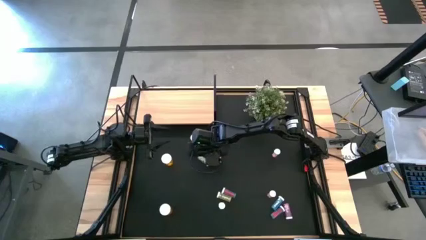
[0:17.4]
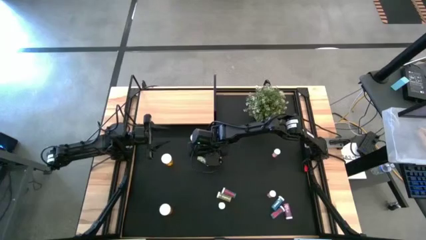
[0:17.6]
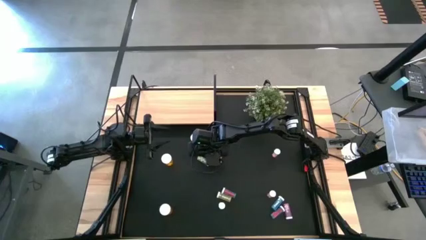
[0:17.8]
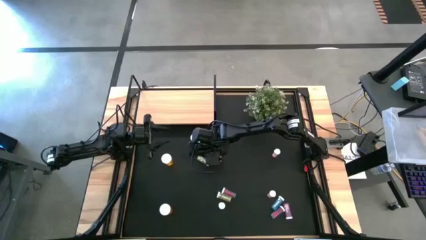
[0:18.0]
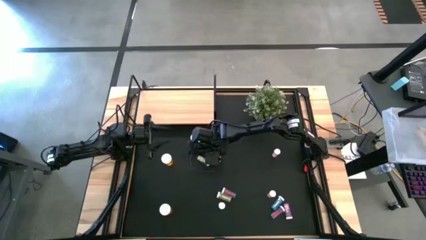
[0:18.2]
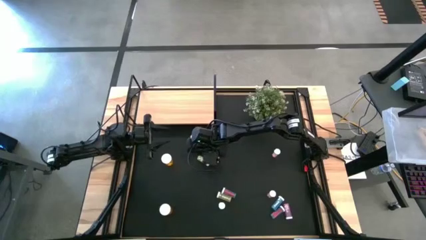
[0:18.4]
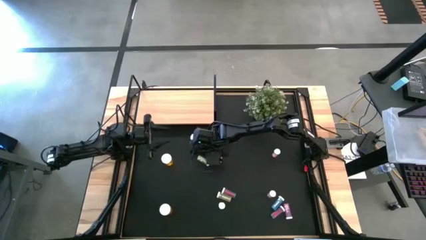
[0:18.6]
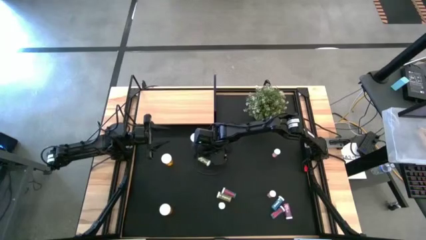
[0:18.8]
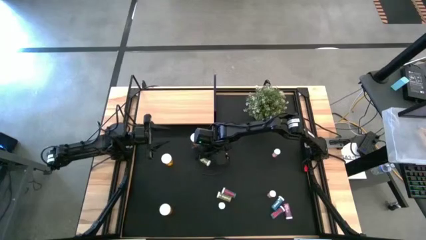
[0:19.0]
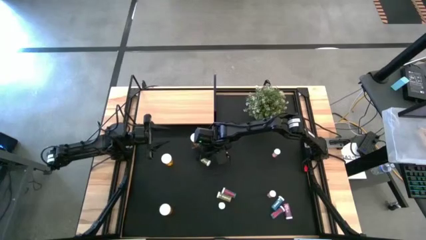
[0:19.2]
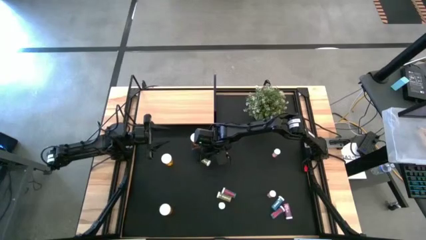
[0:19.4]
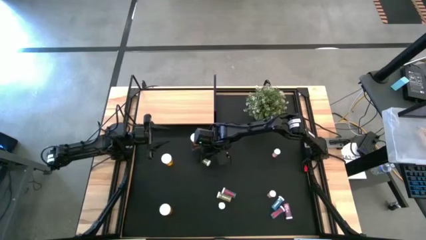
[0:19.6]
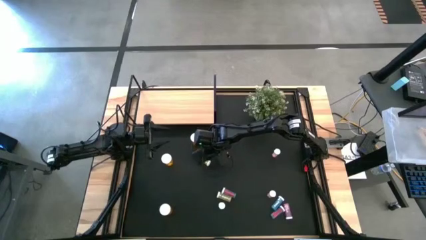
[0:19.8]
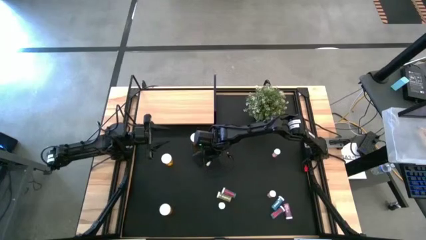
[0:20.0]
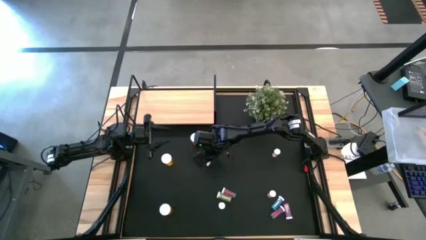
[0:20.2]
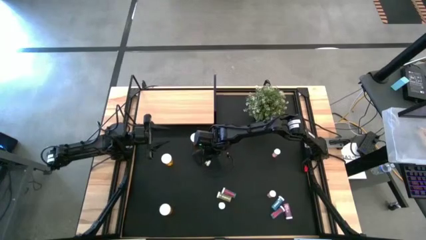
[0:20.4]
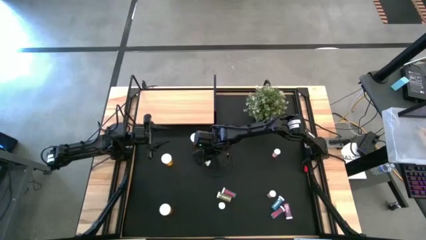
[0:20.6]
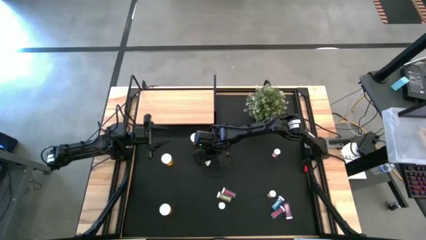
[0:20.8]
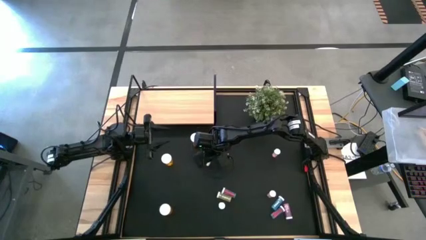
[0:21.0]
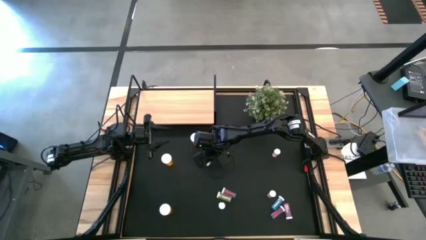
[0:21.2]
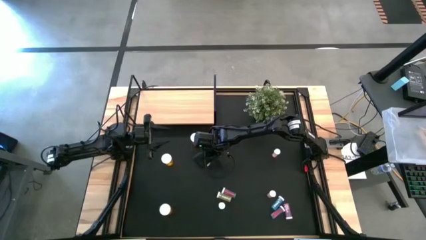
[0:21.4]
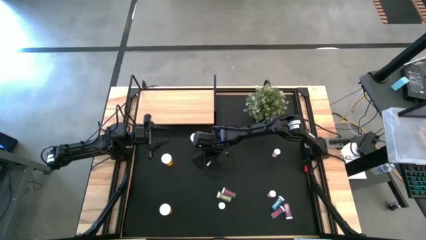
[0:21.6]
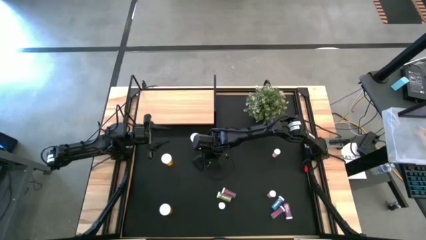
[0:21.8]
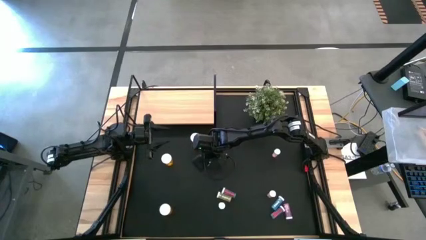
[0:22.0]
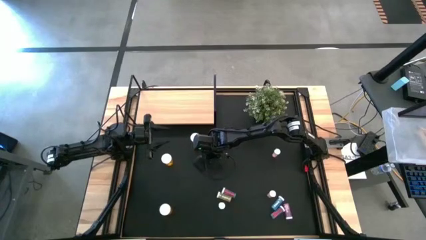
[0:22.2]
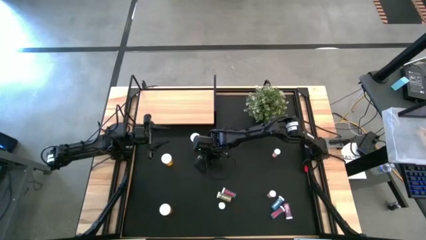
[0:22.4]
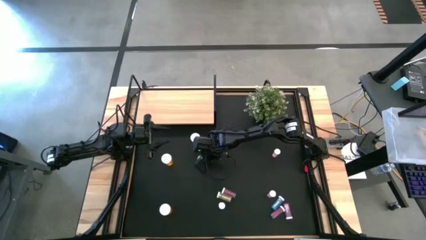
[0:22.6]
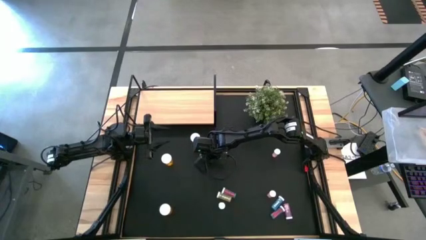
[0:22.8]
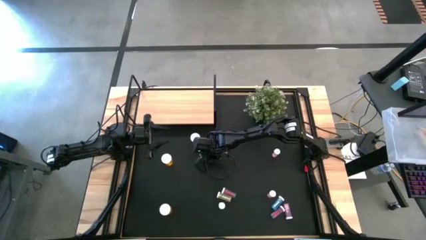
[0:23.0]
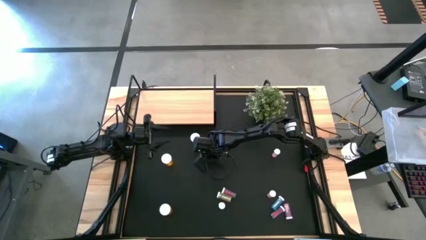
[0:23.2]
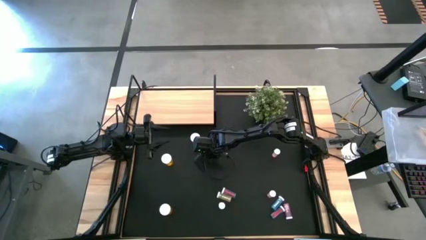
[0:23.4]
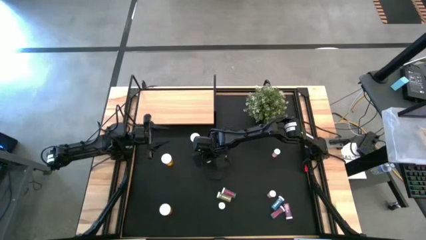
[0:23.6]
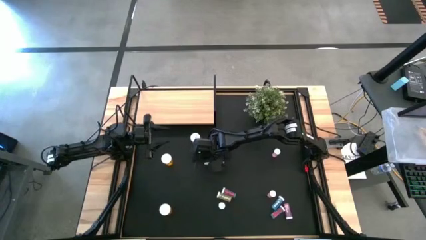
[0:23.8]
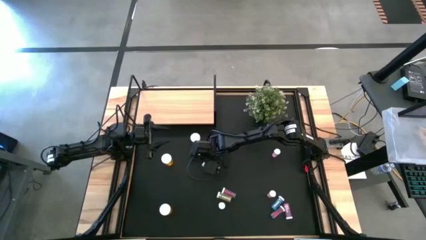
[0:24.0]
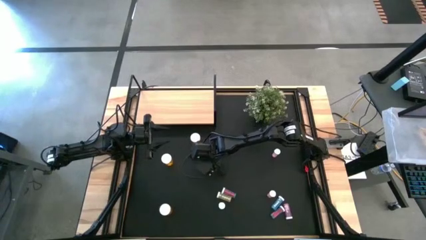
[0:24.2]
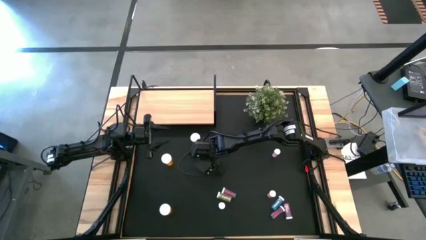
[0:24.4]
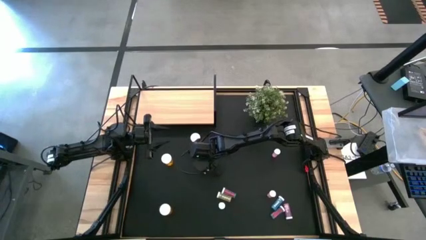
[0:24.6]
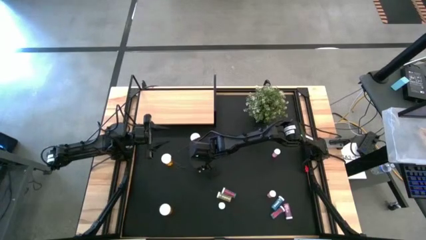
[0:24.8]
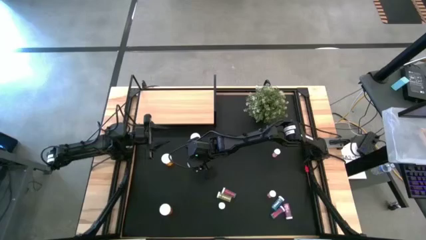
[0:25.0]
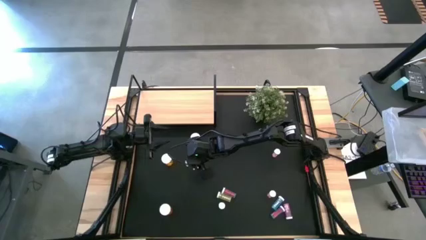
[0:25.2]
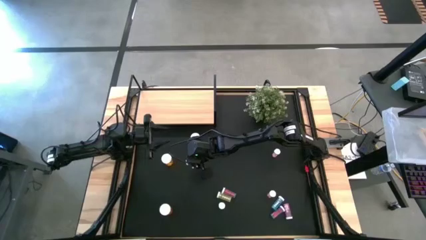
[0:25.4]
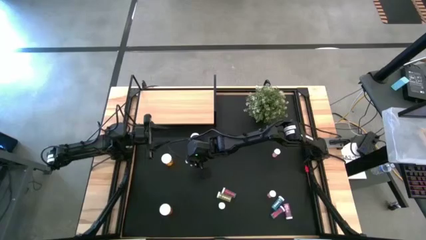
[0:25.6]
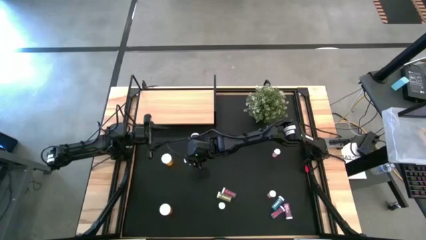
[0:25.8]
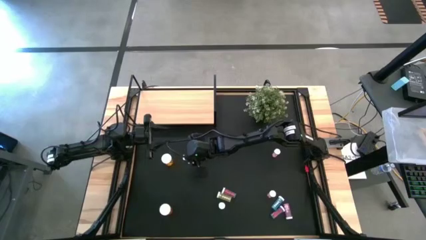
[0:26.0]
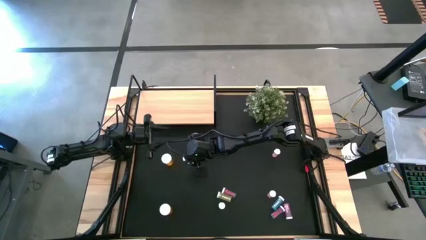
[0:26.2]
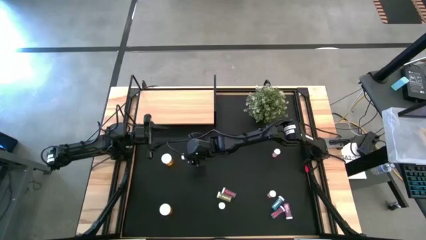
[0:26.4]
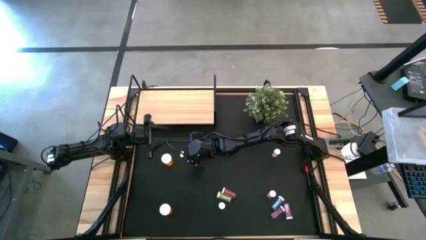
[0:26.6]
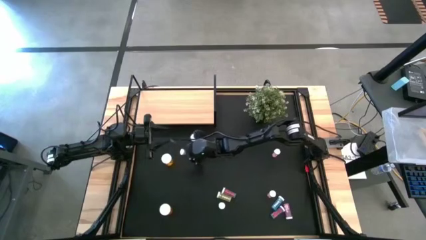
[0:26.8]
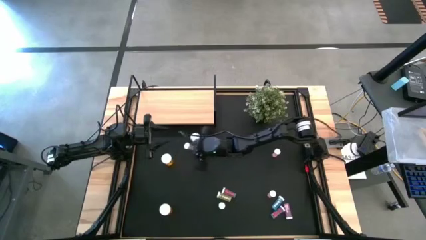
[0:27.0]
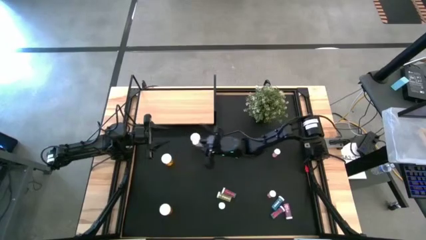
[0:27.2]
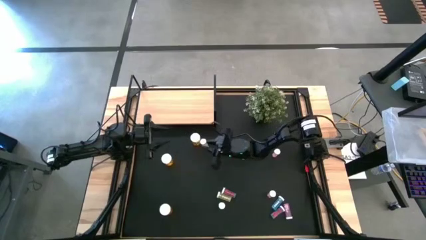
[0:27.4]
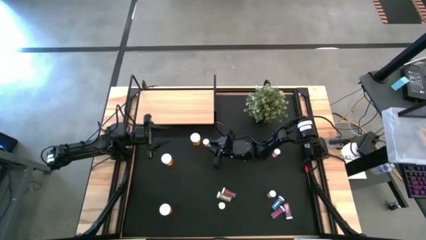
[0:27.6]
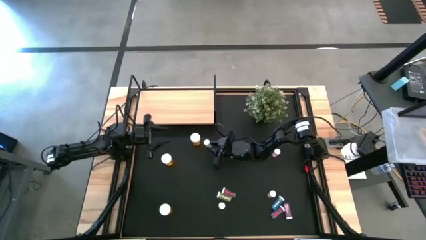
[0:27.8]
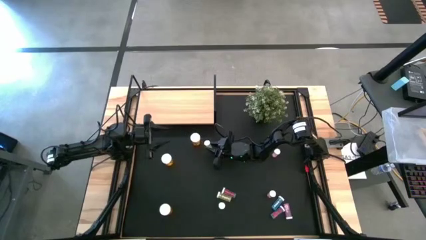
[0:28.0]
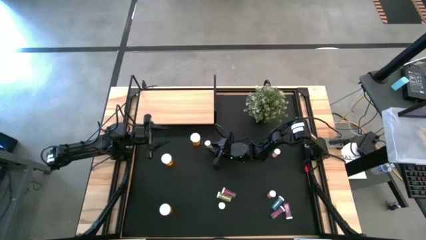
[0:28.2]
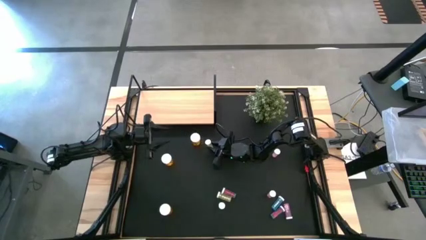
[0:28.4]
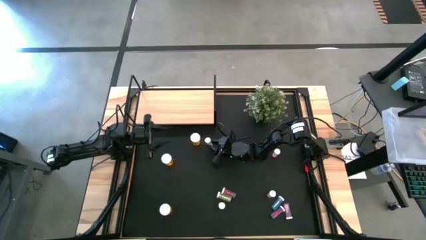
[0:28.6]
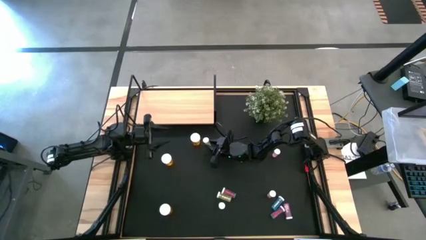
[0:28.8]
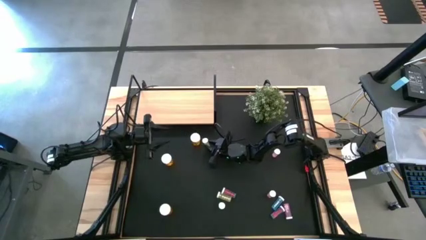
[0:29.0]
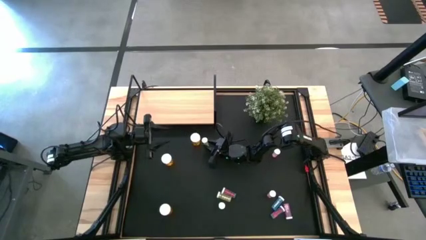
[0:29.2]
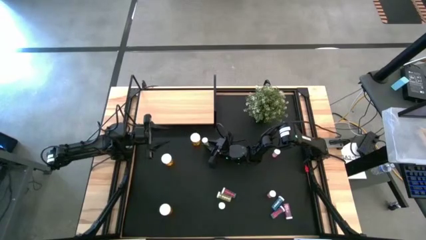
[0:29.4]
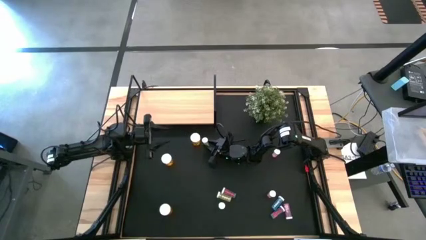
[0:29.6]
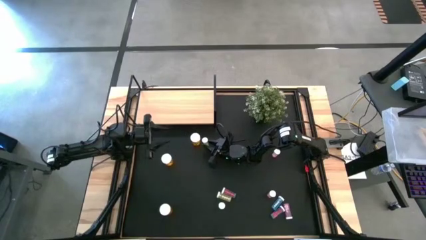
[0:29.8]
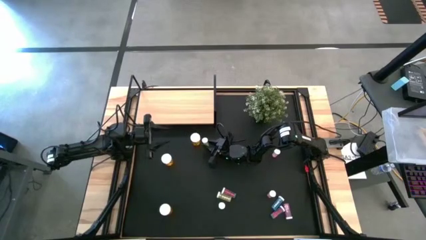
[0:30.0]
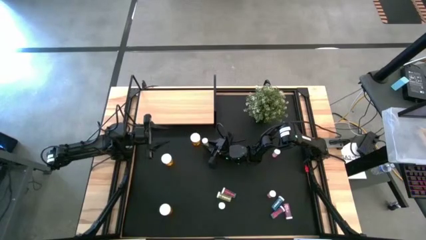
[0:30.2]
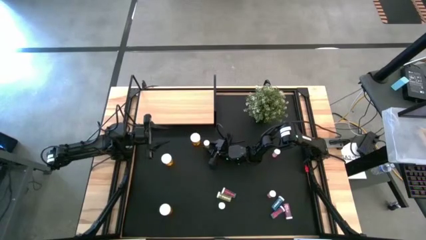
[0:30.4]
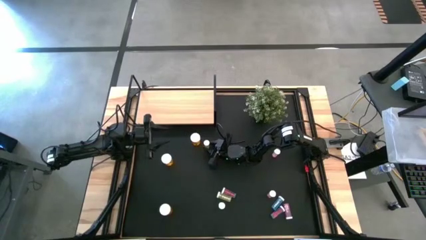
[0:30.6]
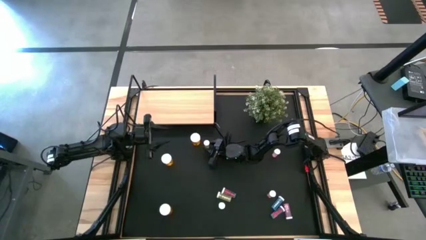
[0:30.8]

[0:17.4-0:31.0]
Task: Pick and place medicine bottles onto shelf by color
Adjust the top yellow medicine bottle

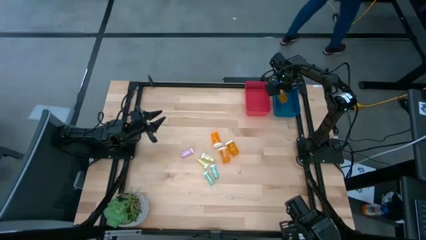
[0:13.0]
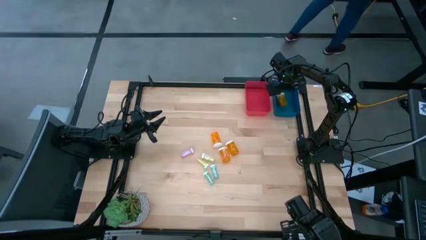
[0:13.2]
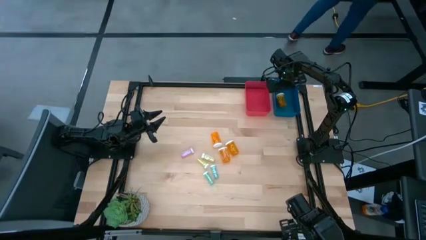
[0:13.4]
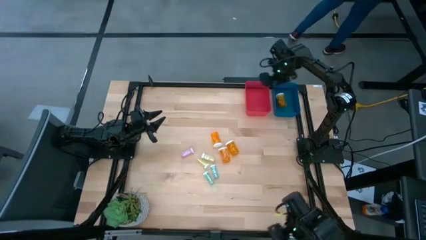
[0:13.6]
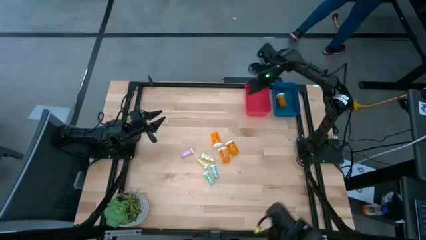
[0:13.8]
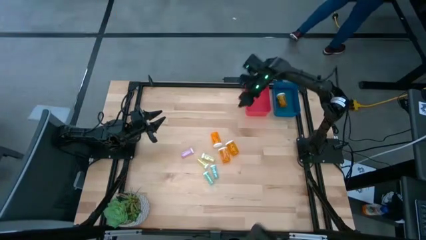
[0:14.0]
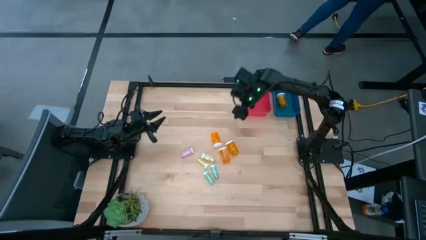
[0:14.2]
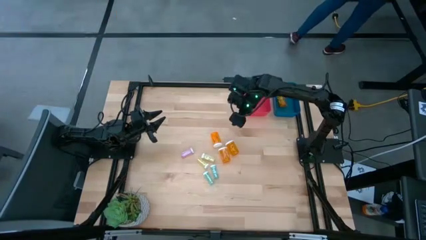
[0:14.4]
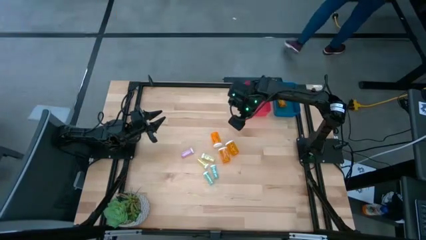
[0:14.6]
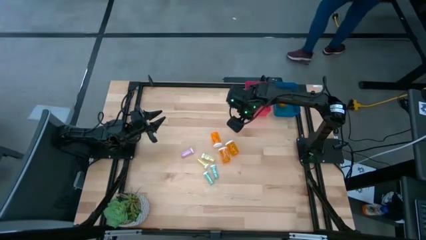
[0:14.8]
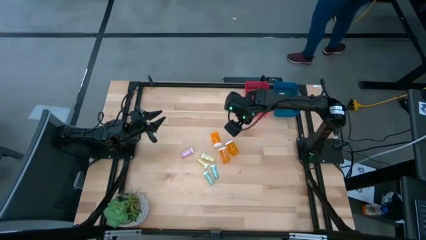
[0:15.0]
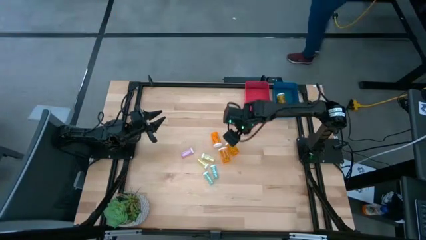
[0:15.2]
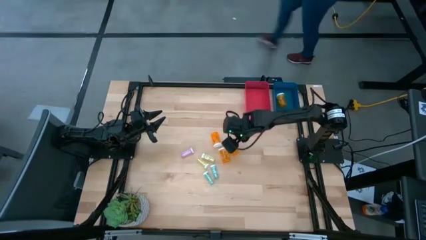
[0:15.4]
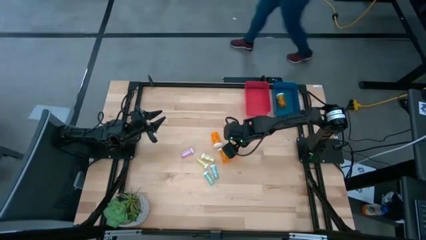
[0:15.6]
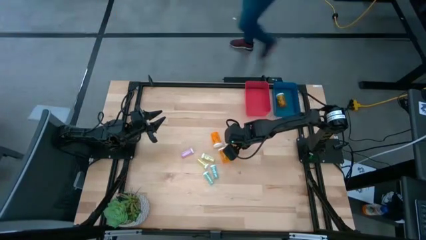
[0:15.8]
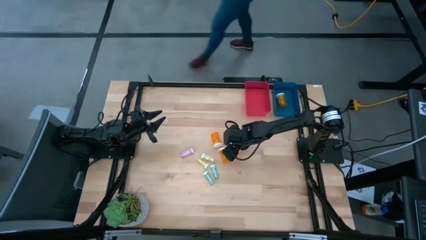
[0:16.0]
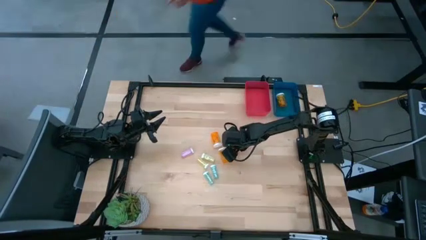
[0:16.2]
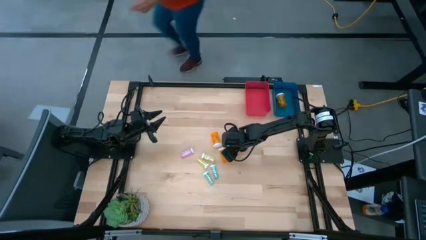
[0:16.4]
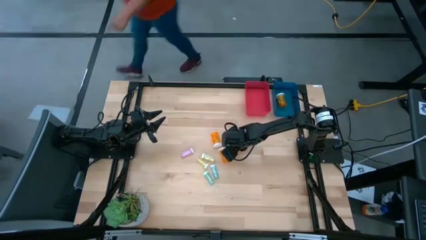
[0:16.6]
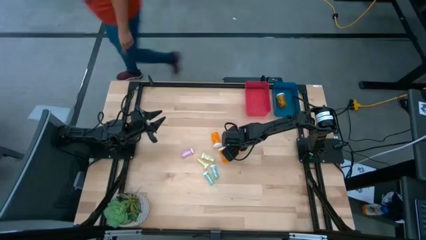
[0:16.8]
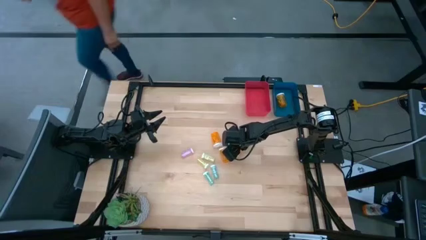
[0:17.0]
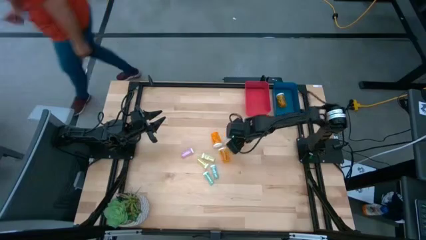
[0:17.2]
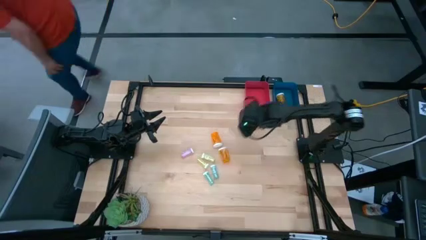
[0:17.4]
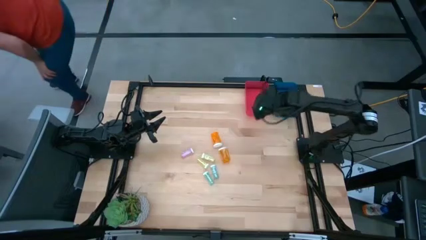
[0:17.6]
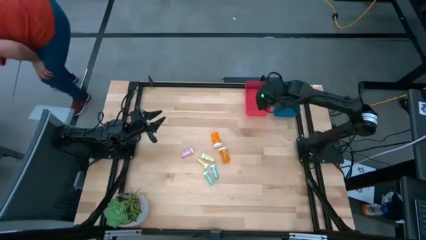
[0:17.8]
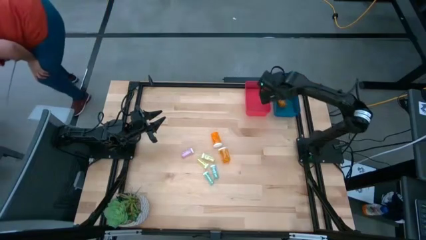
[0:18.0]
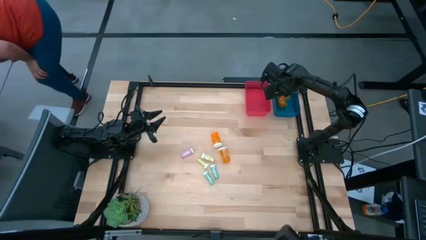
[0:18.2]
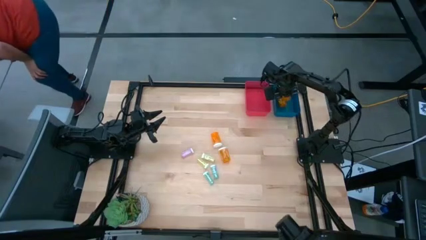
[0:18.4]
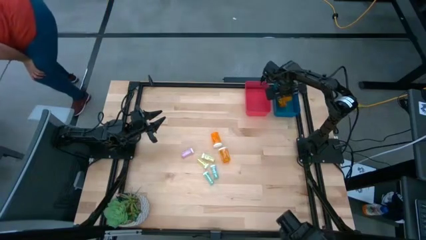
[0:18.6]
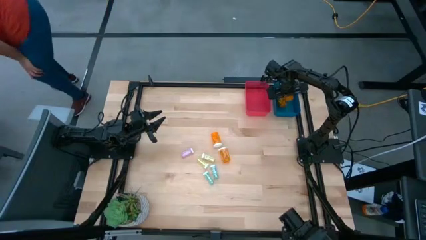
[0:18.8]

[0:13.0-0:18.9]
Task: Pick and place medicine bottles into bin by pill shape (circle, oval)
Put the orange capsule bottle into the blue bin
